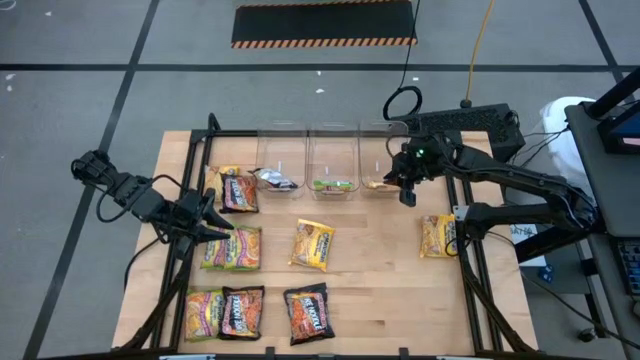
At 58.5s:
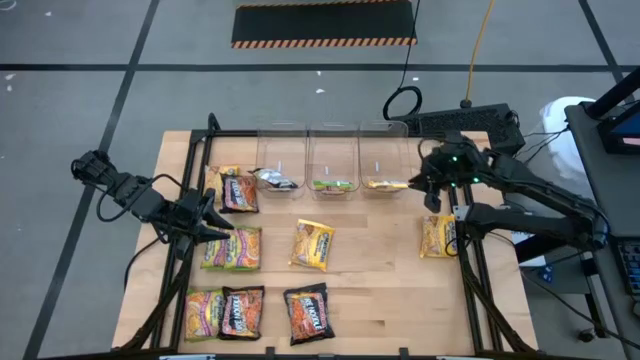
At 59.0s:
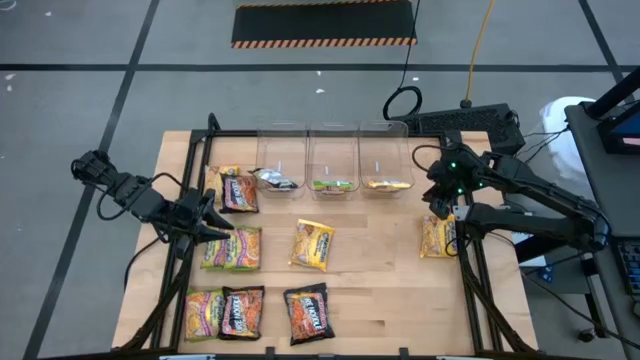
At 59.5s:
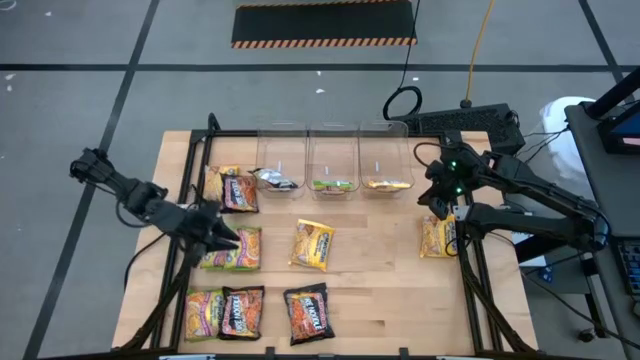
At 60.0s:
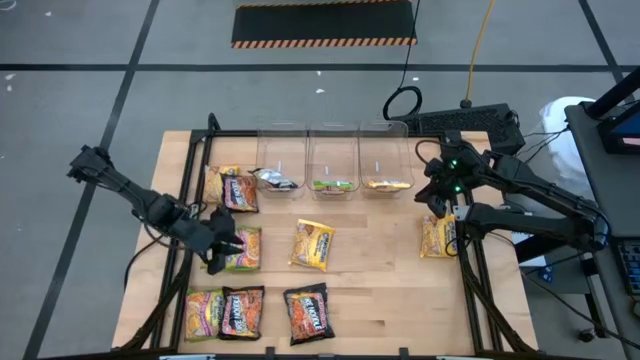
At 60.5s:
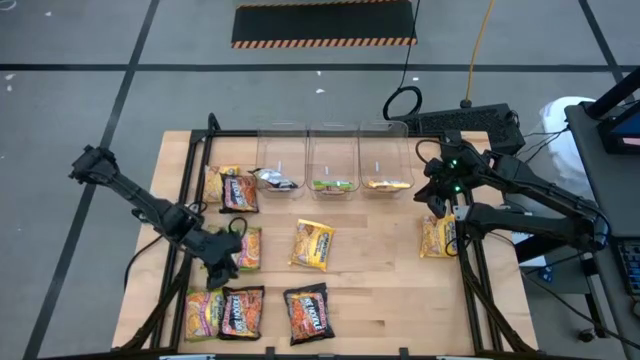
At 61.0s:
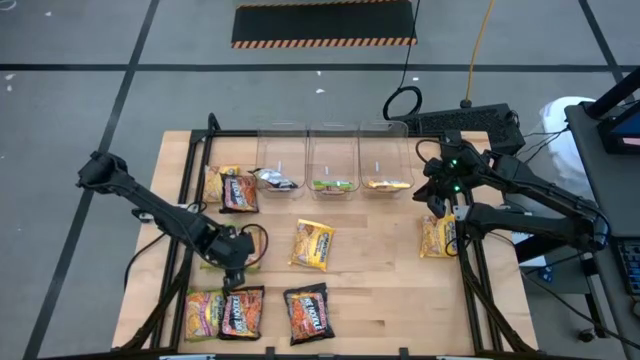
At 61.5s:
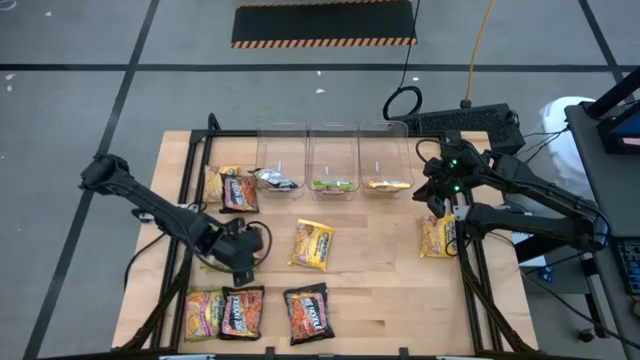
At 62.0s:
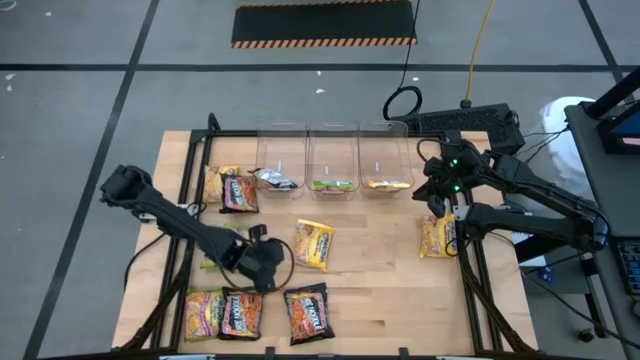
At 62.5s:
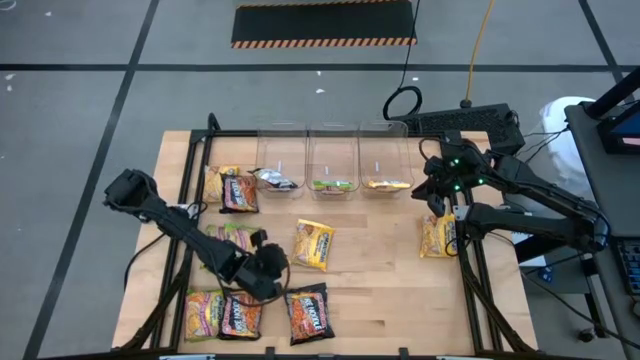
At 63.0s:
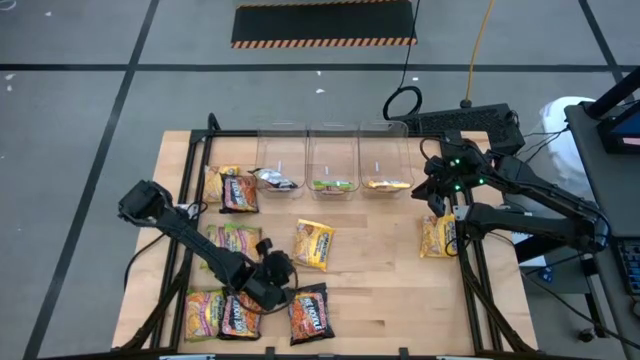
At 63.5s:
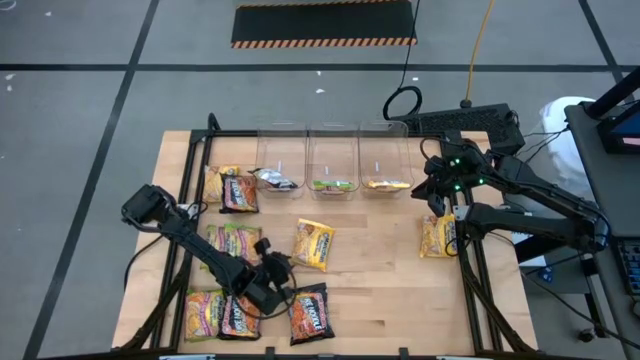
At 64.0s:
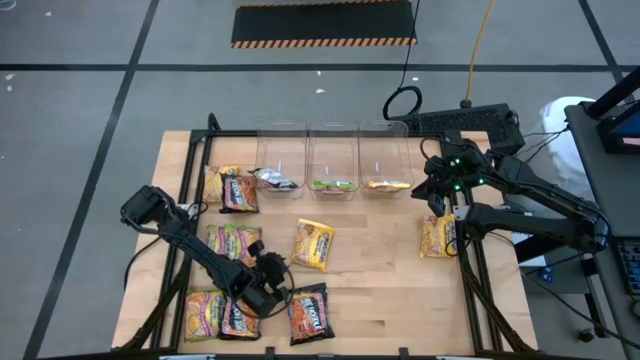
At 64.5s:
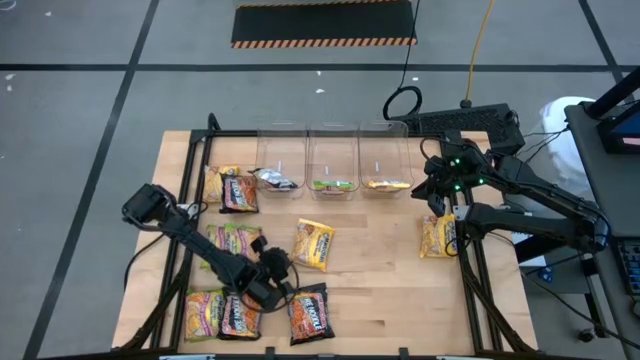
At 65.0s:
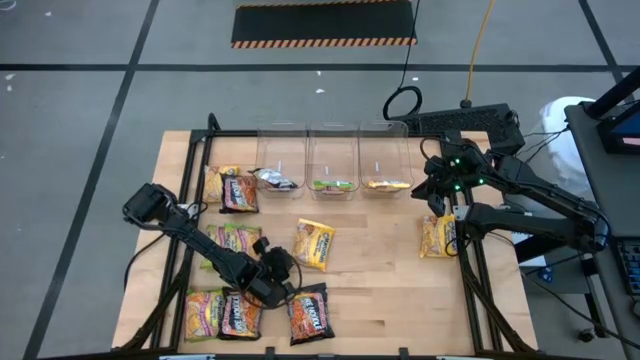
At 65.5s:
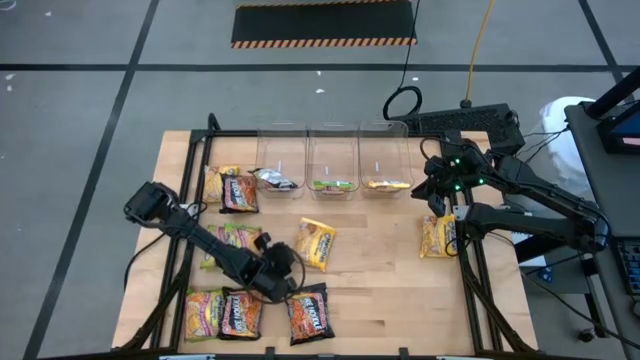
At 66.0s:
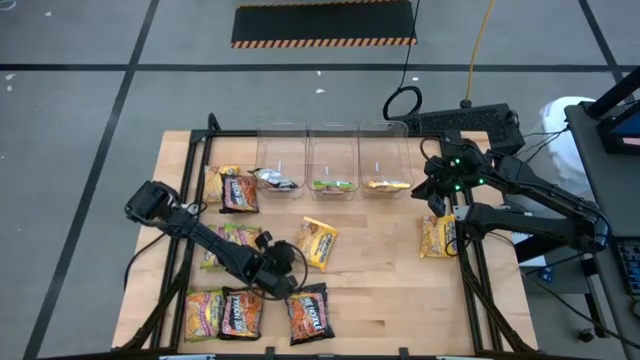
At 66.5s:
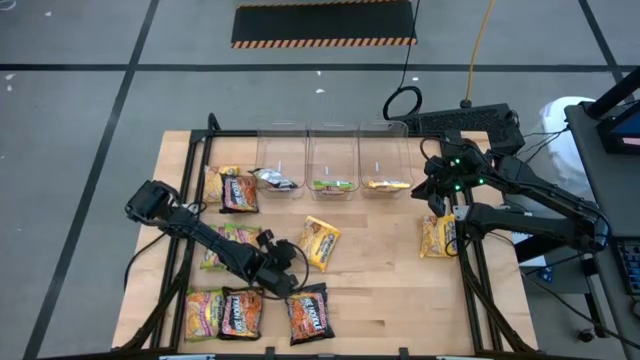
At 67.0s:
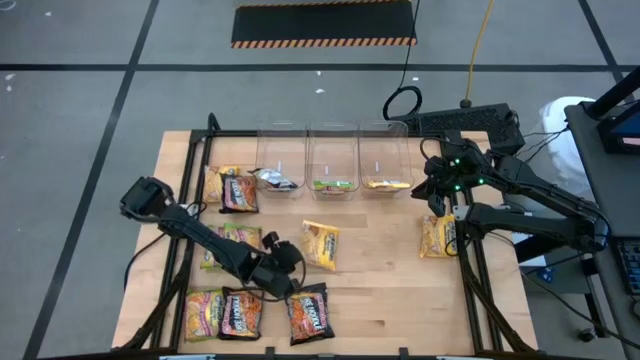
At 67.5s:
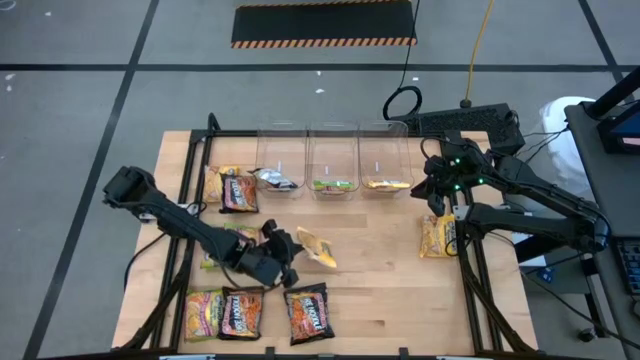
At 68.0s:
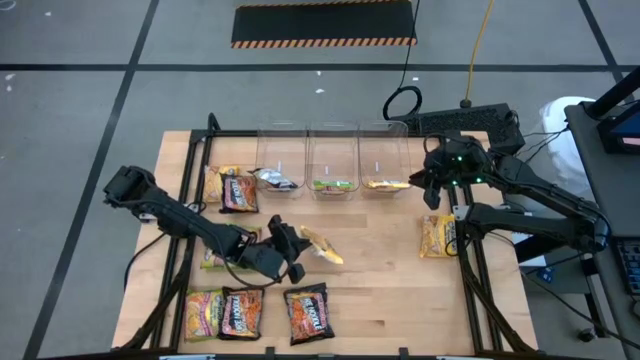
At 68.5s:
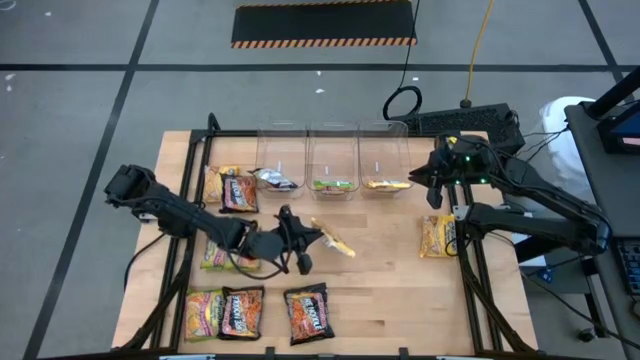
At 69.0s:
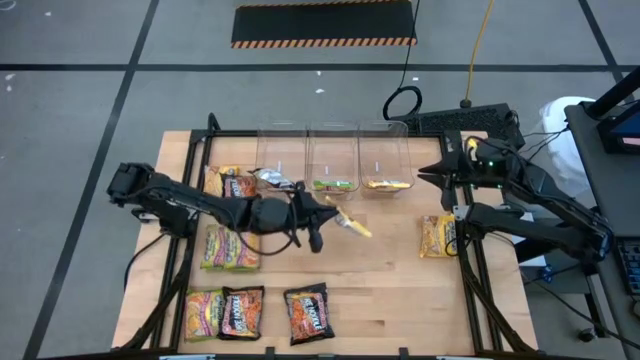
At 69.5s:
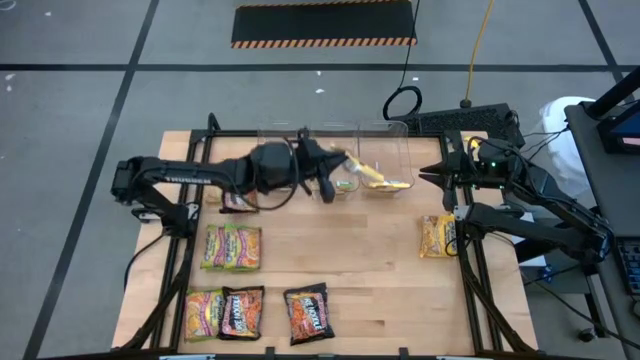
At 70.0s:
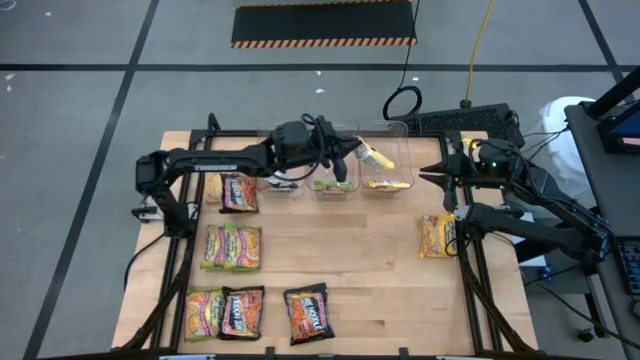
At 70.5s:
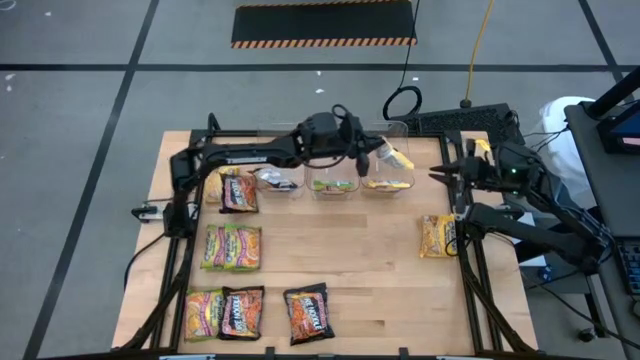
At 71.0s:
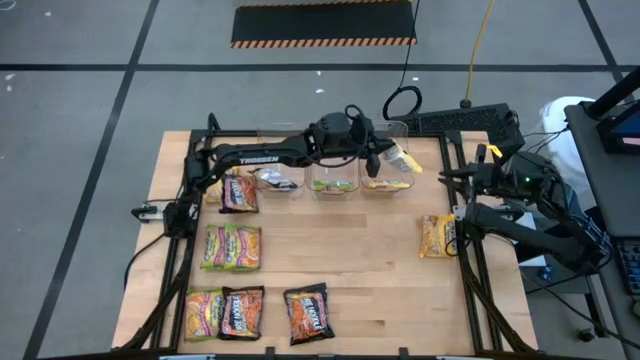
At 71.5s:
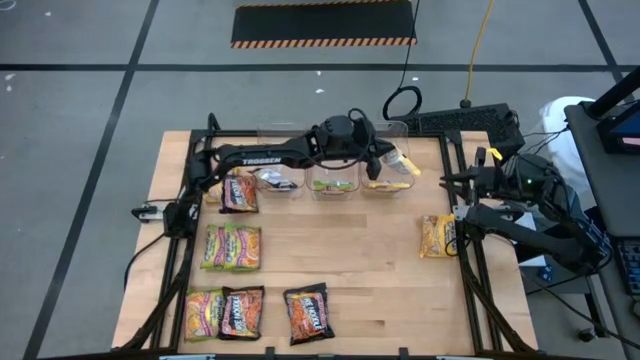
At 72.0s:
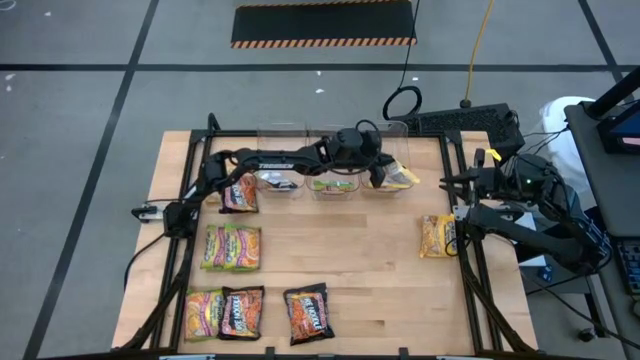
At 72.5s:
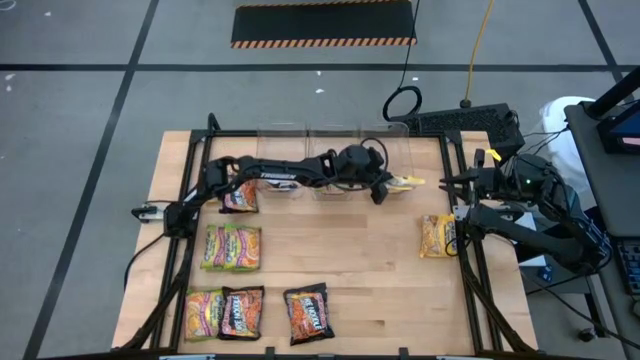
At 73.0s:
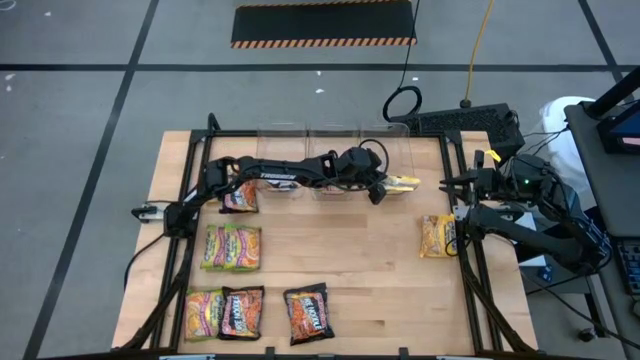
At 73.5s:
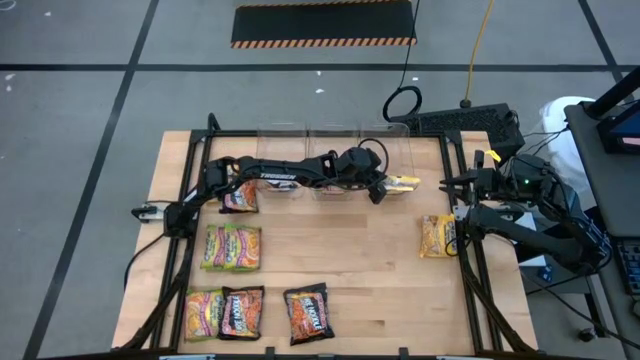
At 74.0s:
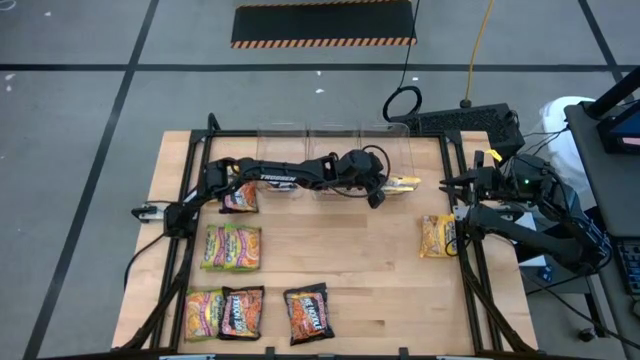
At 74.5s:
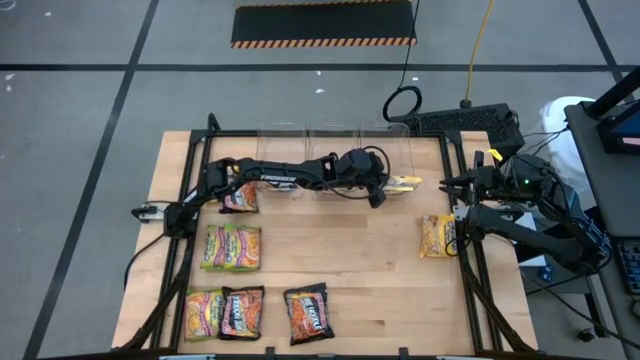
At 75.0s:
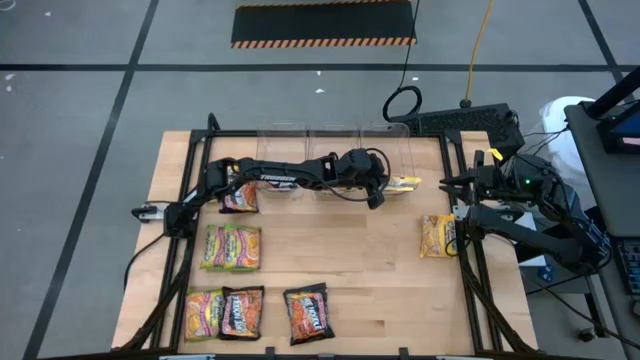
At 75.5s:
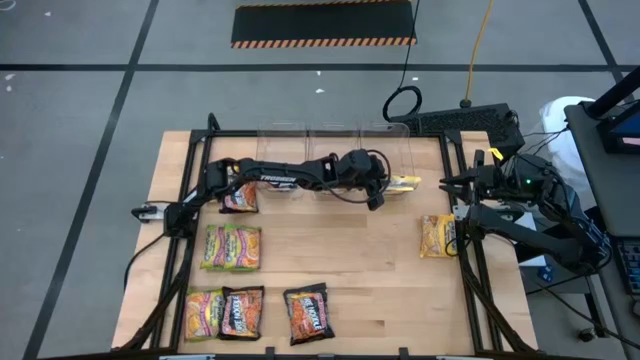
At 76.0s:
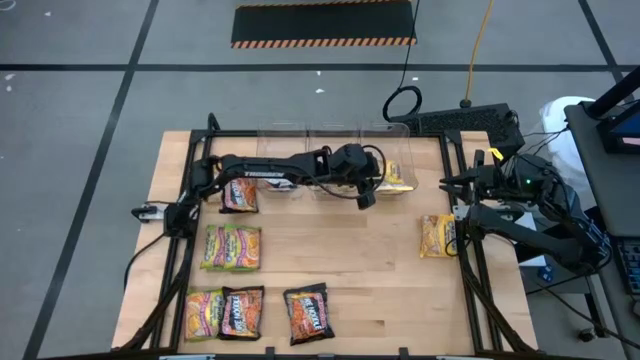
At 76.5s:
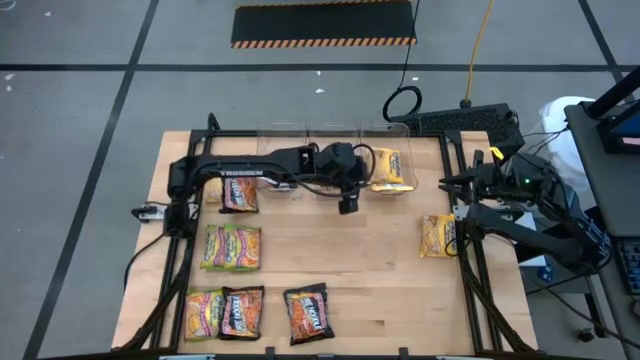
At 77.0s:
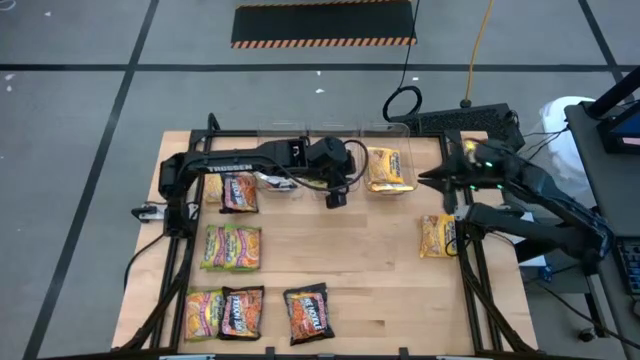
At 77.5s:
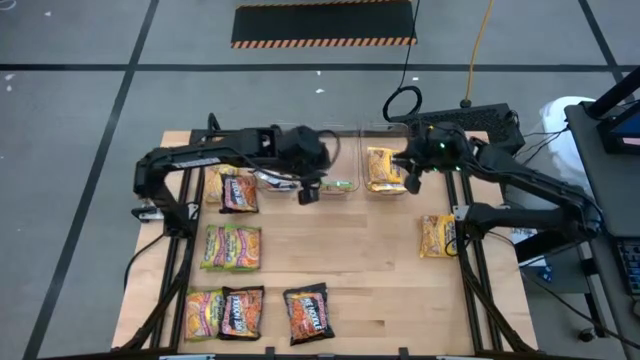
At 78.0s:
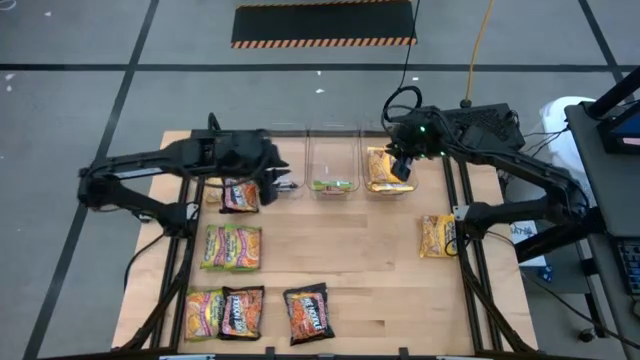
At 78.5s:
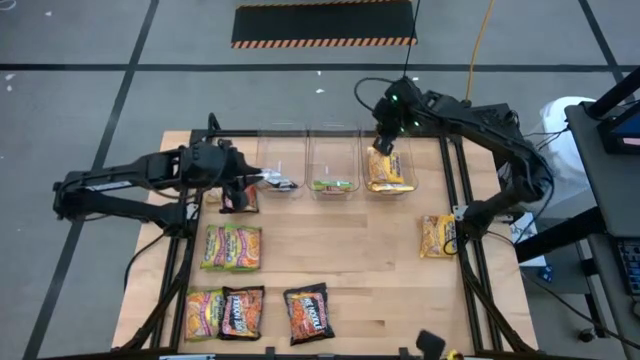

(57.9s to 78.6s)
Task: Sort Maruchan noodles
Put the yellow noodle pack into the right transparent bin
